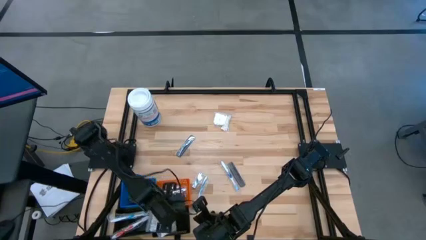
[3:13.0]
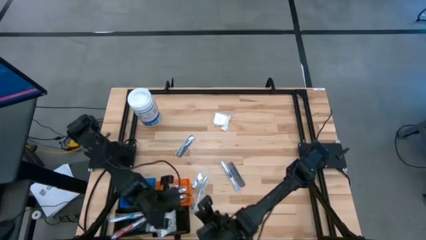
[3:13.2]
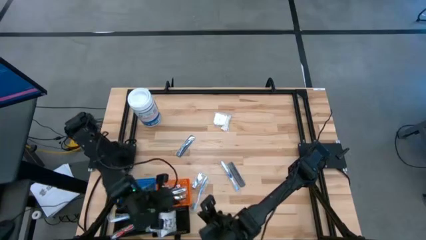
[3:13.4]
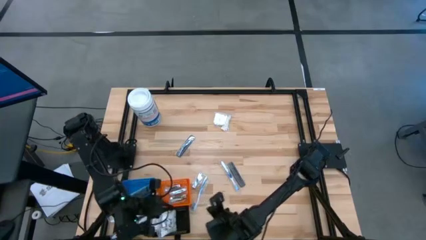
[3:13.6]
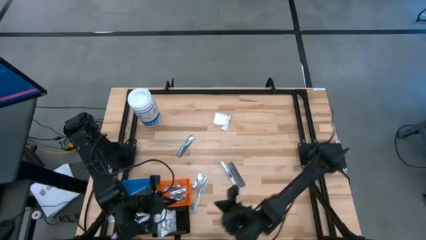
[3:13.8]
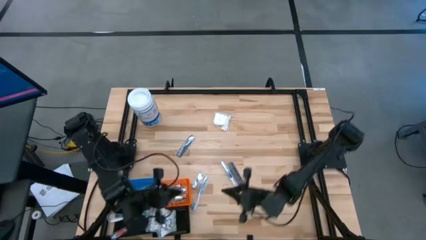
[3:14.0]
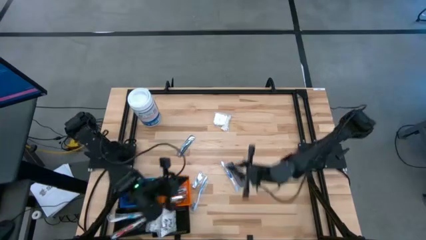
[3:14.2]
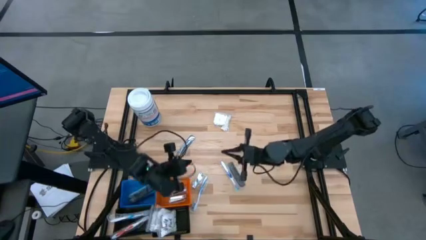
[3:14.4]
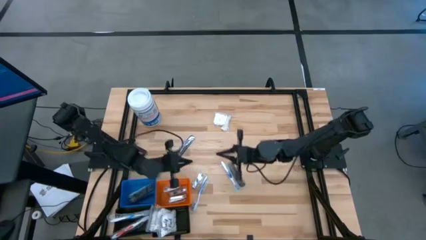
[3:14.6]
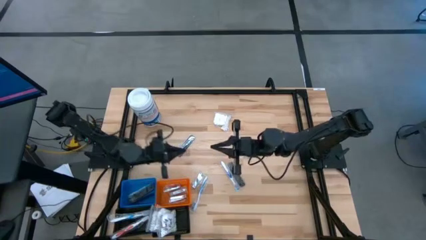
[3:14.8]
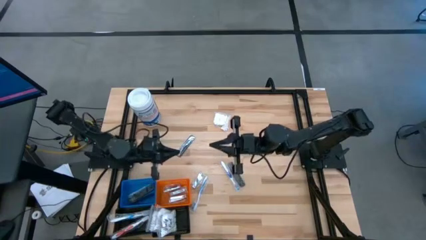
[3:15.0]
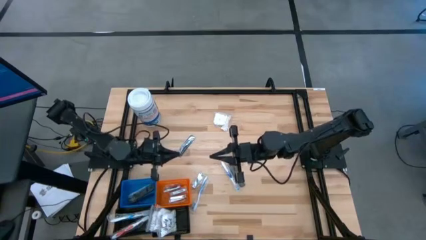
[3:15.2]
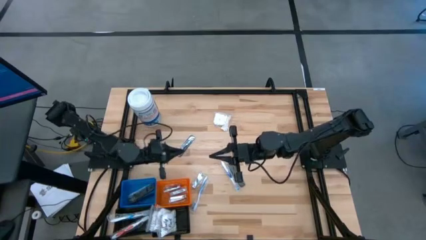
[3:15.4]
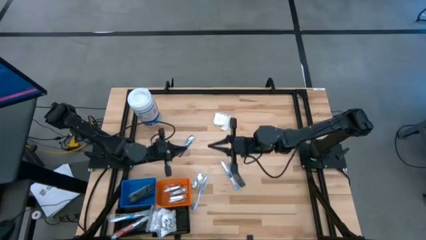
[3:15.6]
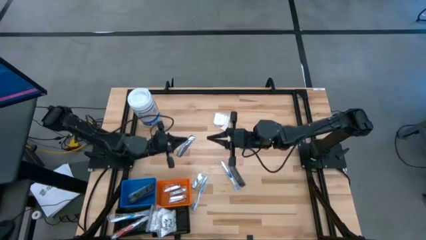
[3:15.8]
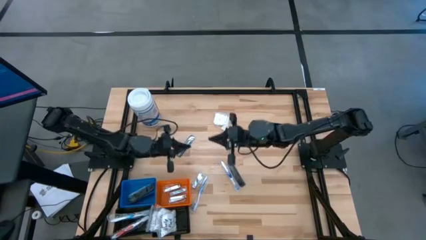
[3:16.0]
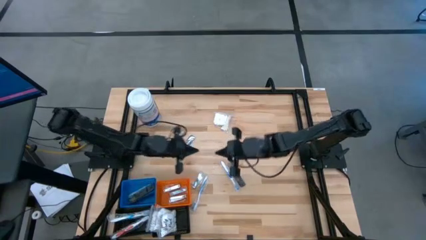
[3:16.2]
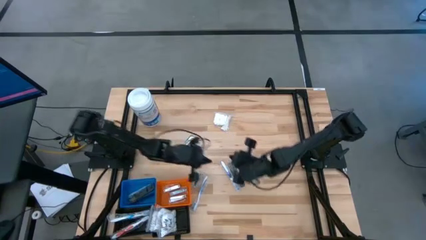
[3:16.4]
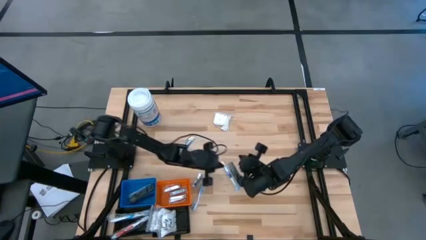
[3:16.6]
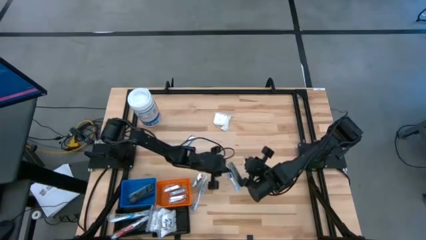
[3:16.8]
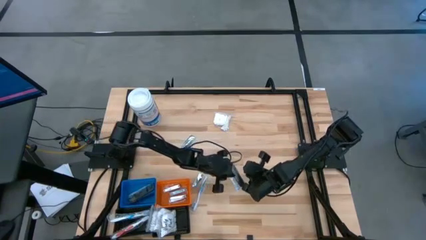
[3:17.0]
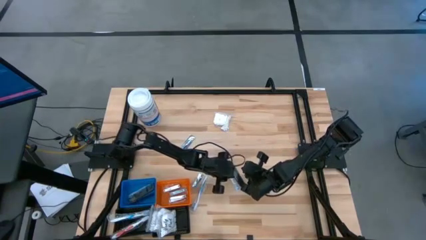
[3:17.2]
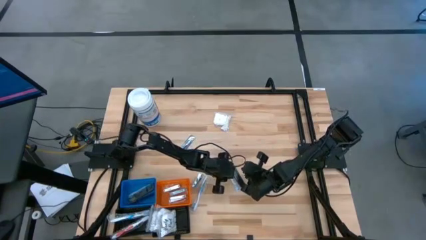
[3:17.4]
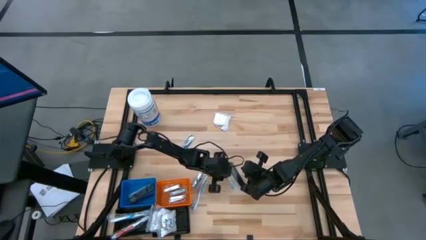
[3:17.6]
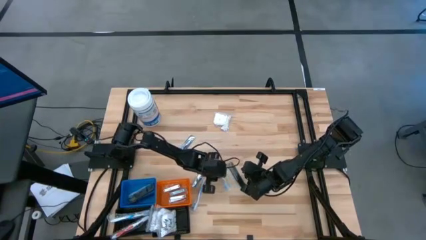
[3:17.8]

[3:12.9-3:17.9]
Task: Pick & Place Travel size toiletries
Adjust the blue toothbrush

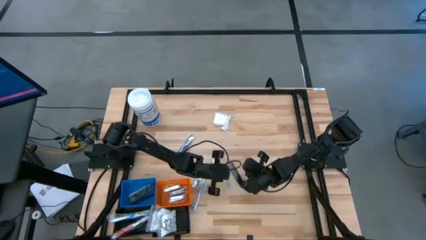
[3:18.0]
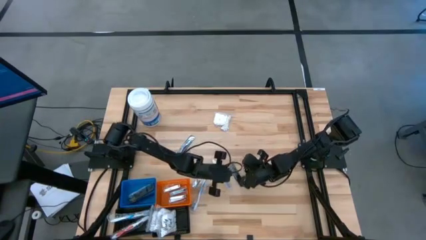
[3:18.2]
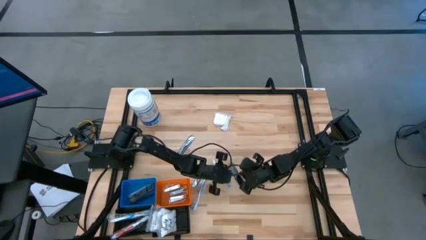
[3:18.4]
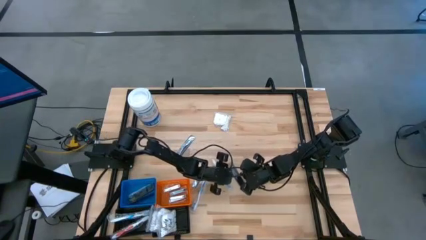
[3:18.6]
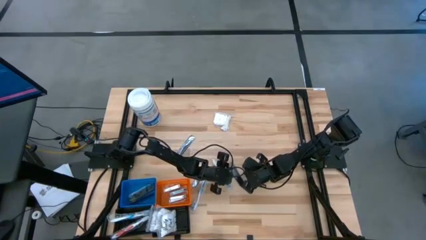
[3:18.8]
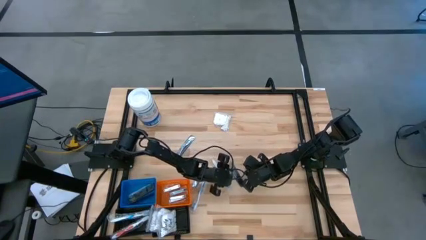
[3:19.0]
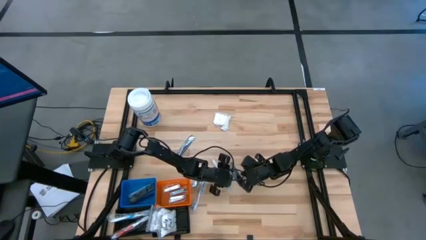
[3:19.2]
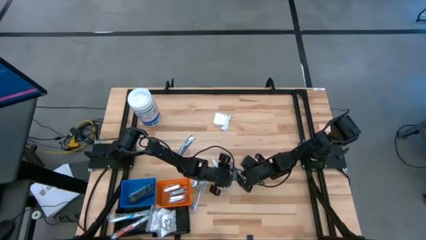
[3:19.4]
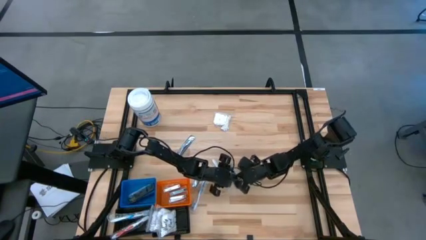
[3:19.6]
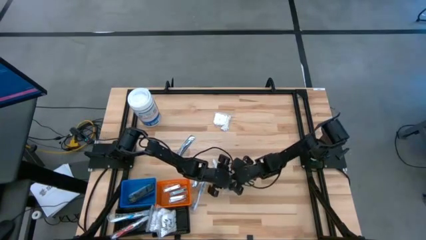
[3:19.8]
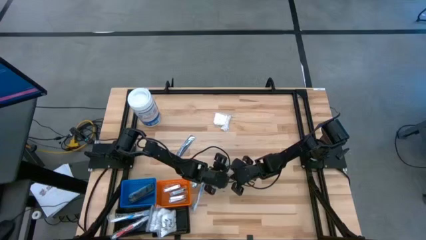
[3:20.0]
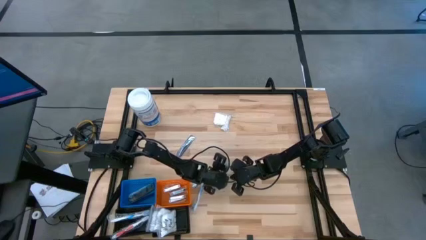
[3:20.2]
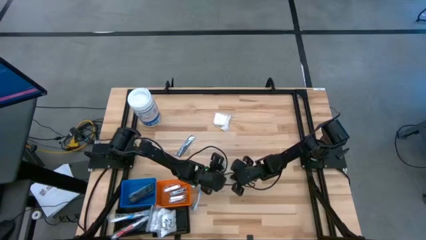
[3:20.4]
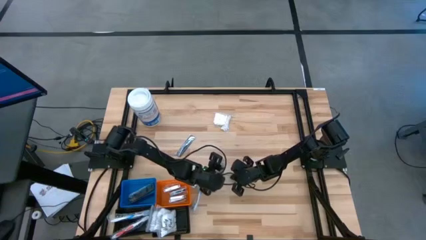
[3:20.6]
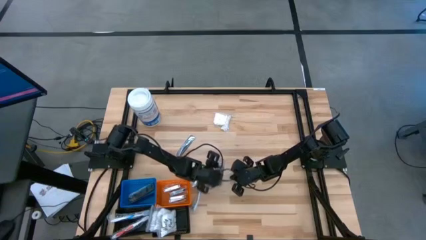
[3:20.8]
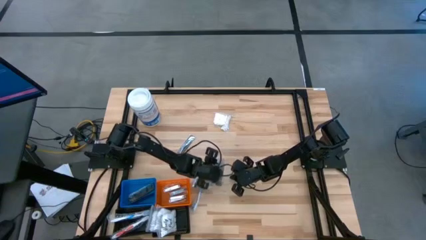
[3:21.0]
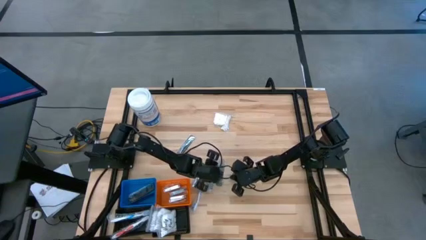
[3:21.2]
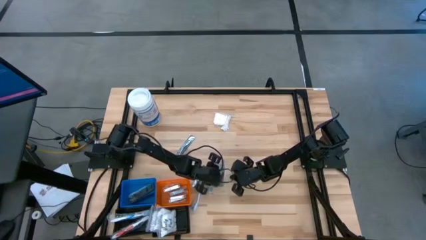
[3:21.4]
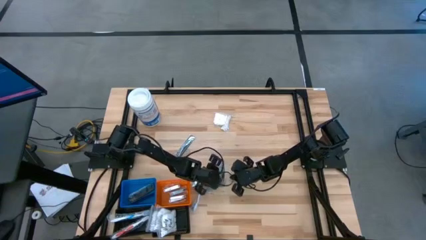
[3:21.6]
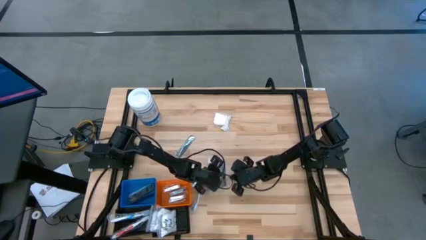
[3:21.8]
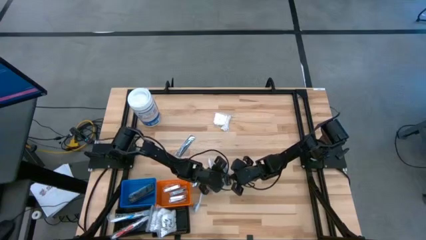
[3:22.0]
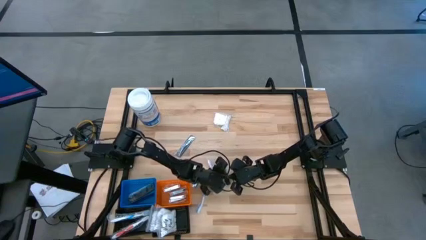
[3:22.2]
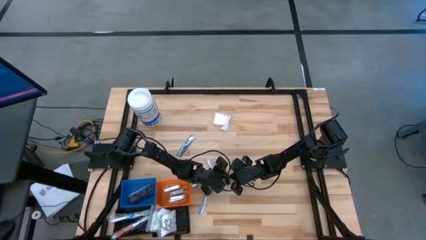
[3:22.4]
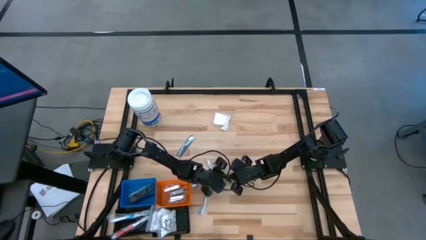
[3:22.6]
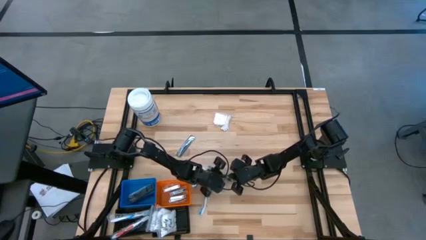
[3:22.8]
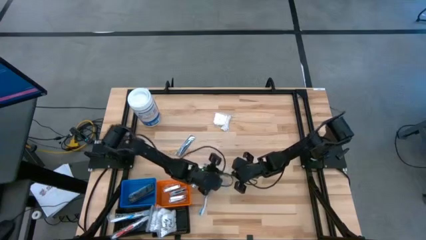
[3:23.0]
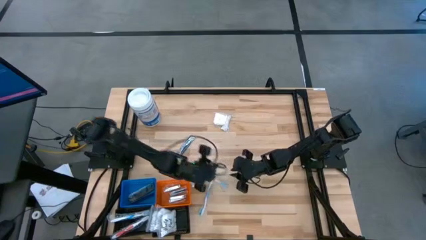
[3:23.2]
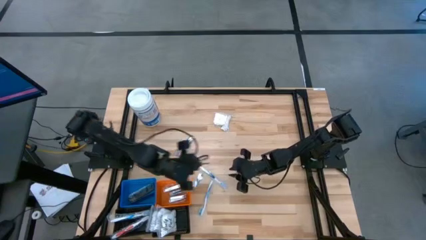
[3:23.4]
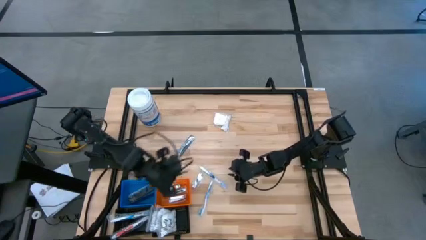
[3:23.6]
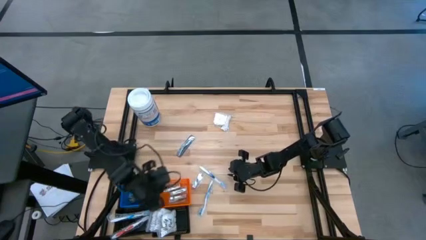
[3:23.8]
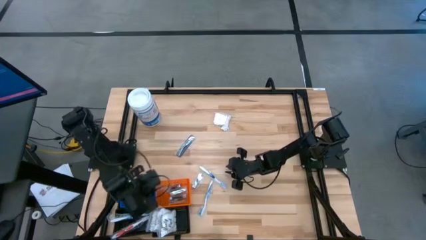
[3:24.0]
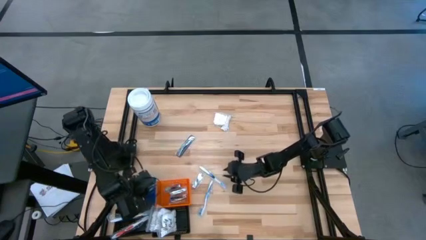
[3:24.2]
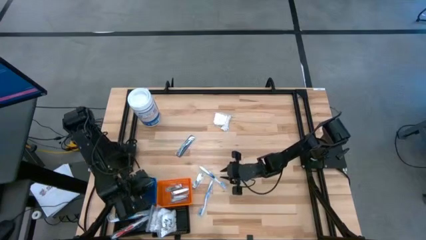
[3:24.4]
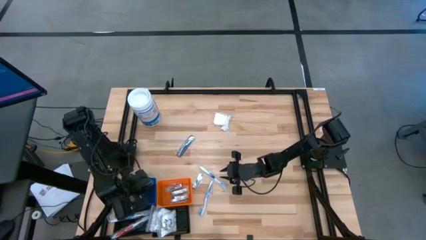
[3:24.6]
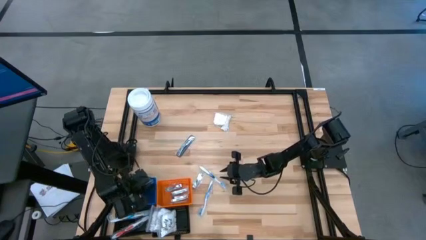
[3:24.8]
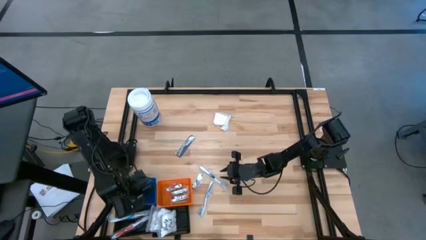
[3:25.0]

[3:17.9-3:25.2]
Put the black comb into the blue basket

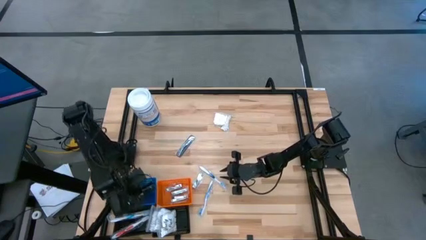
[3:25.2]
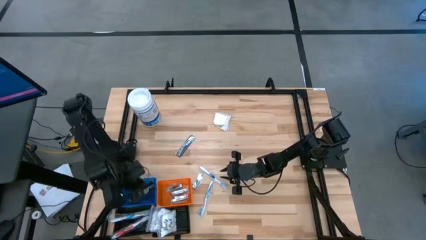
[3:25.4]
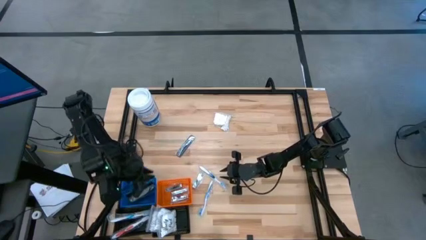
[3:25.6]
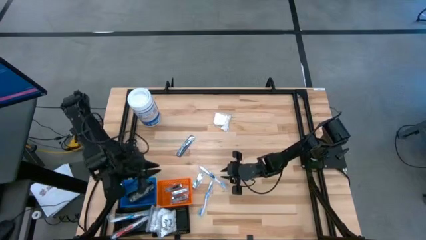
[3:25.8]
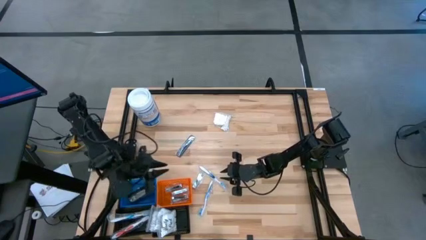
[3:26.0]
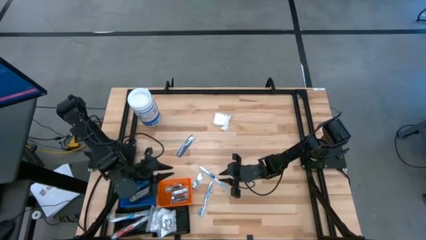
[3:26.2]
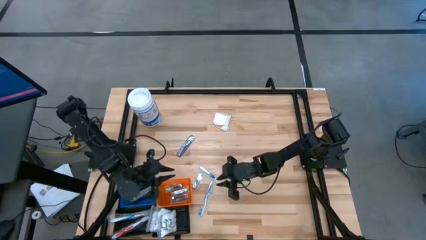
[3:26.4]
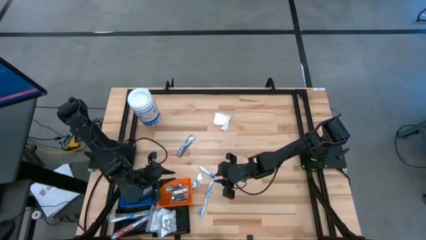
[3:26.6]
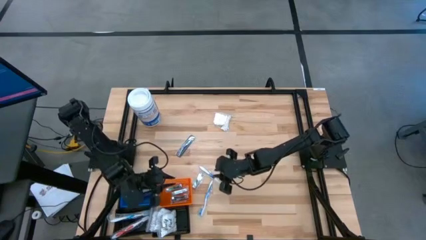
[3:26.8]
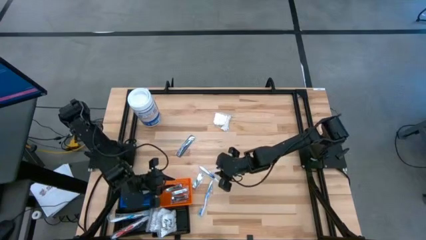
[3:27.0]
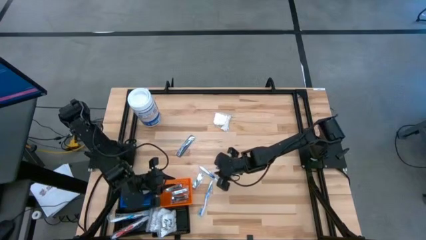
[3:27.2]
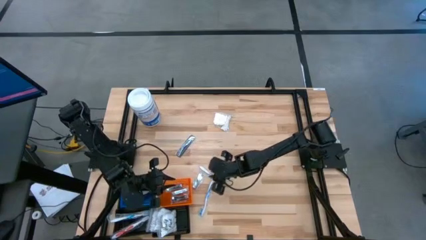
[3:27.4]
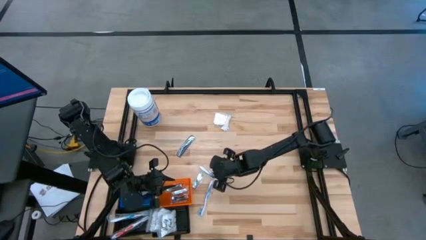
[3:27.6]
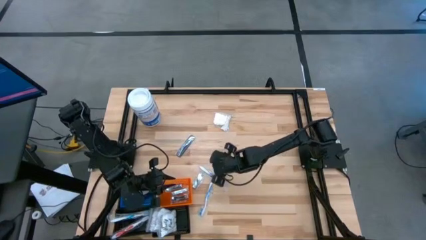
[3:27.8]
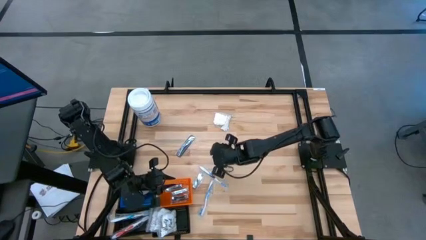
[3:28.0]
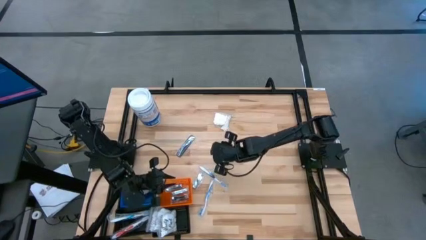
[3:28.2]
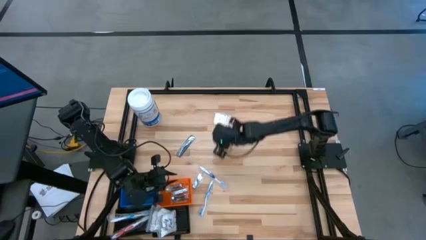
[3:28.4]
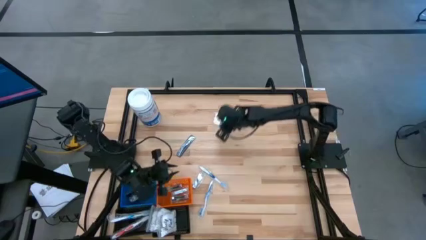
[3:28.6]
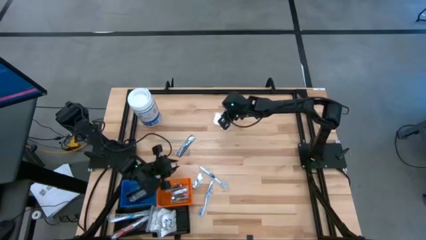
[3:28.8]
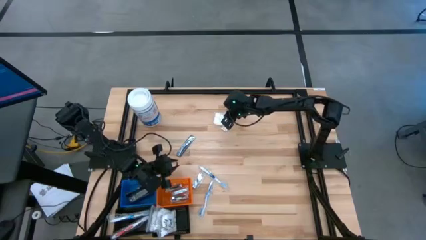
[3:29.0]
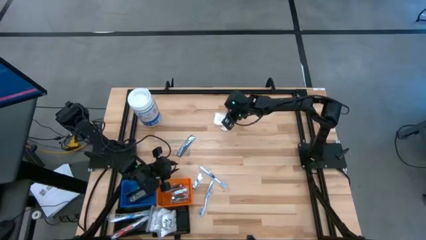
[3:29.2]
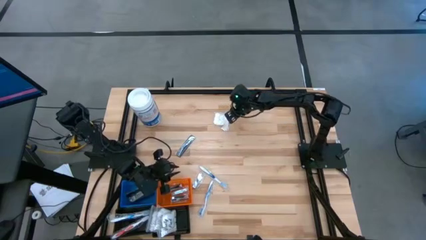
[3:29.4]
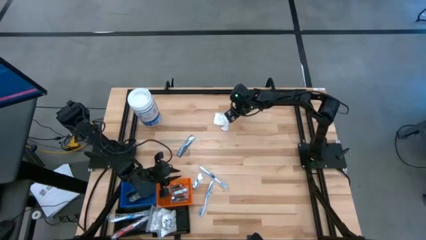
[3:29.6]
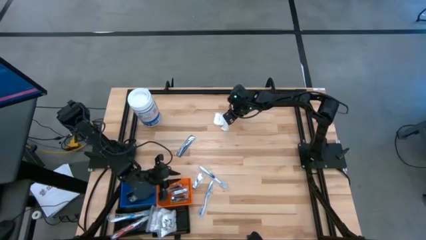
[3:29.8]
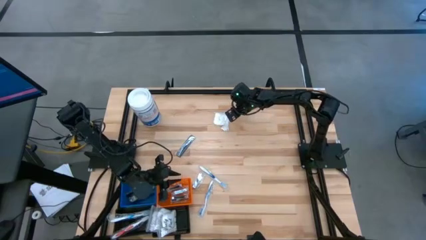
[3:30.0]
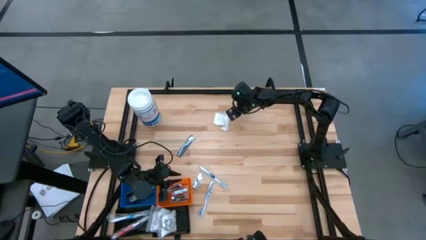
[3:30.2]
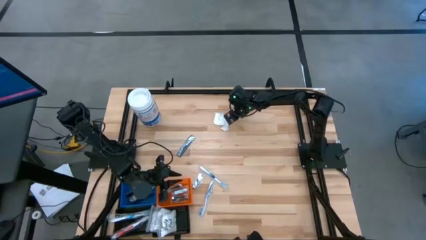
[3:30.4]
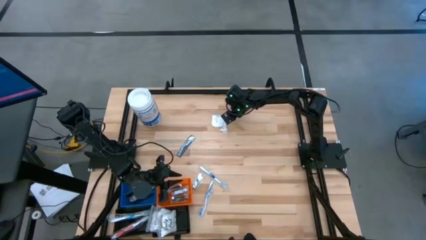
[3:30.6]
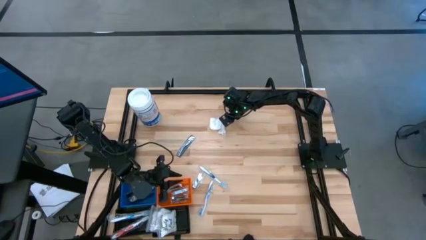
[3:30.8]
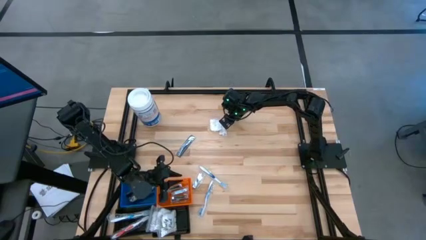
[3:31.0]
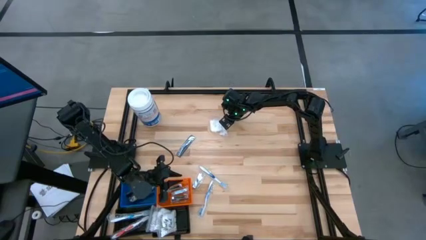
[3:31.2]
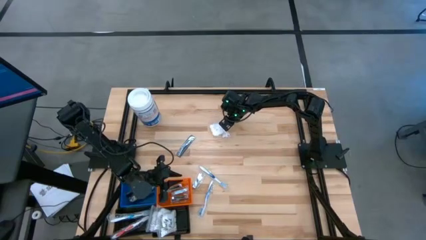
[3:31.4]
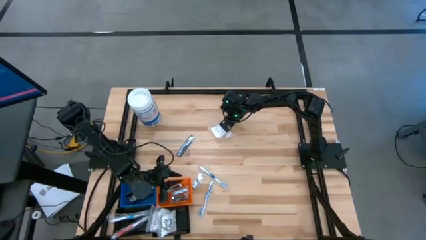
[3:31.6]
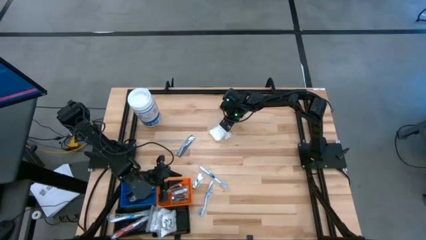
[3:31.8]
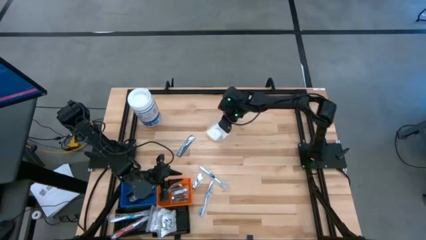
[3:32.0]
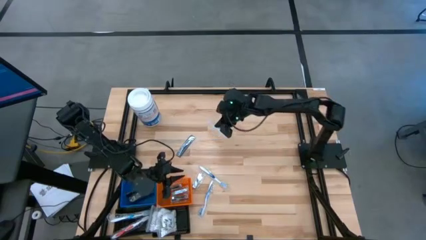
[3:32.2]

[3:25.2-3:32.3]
Put the cotton pack into the right black basket
